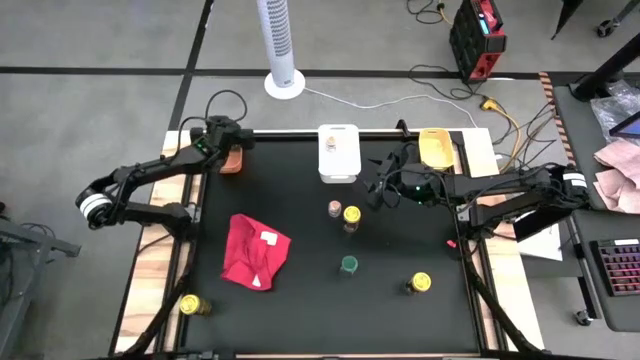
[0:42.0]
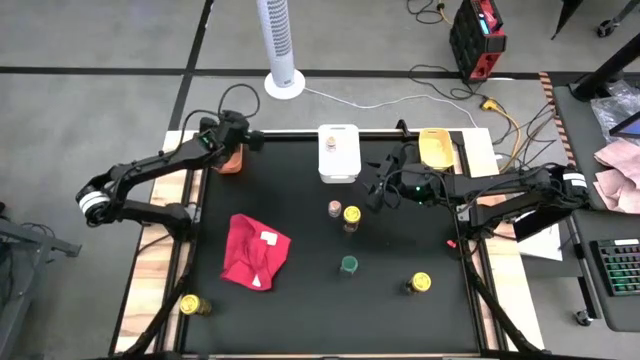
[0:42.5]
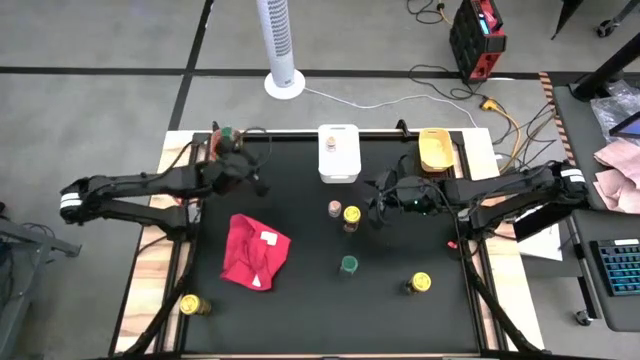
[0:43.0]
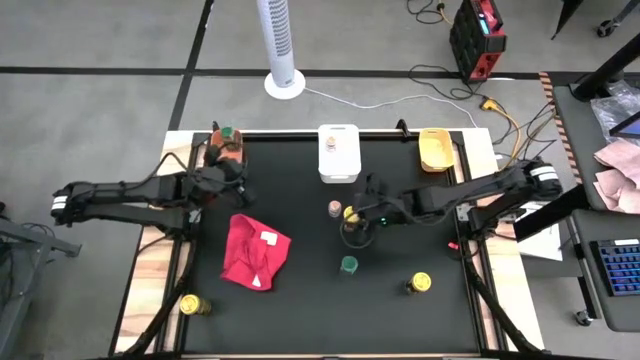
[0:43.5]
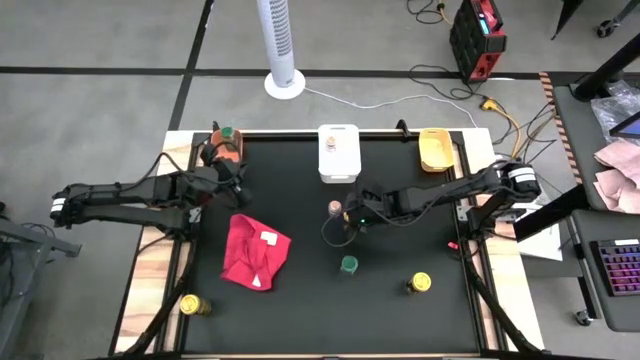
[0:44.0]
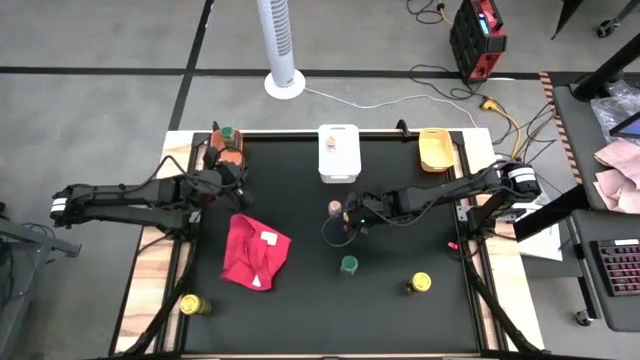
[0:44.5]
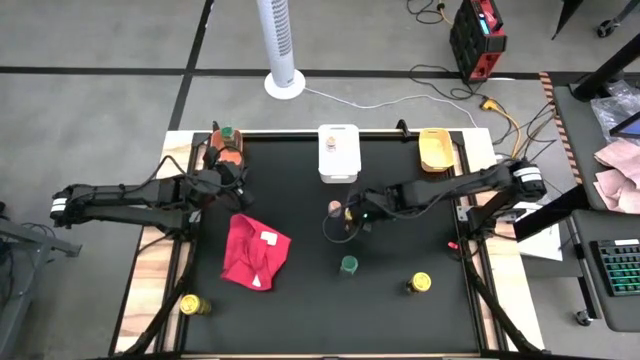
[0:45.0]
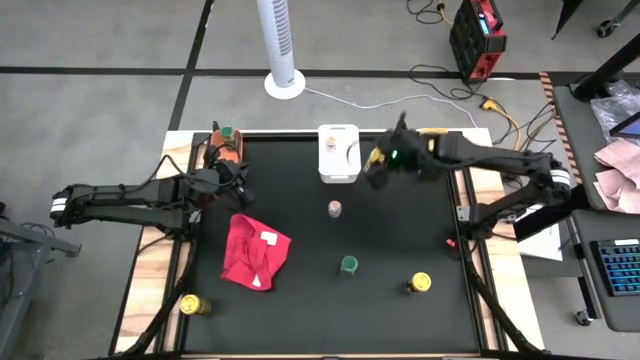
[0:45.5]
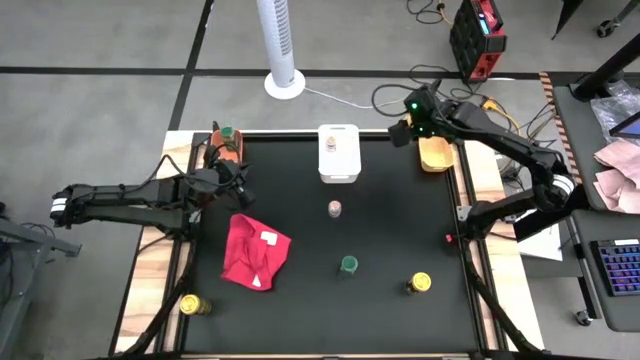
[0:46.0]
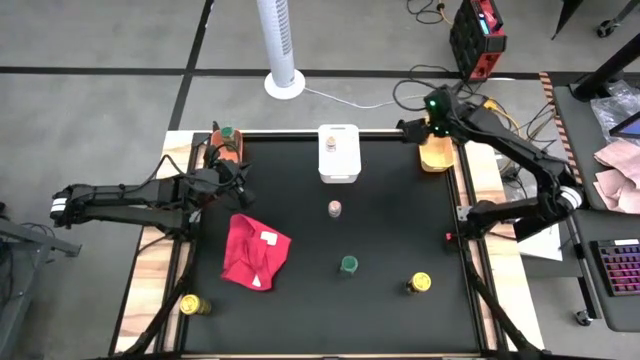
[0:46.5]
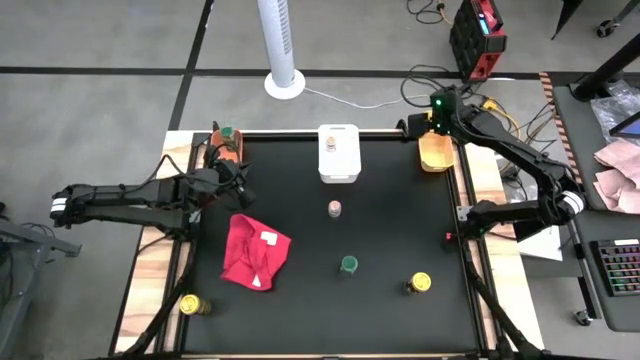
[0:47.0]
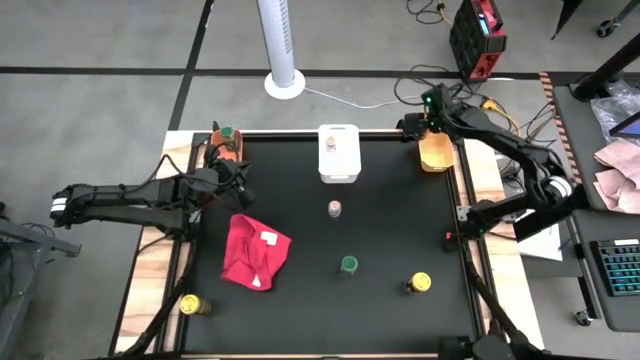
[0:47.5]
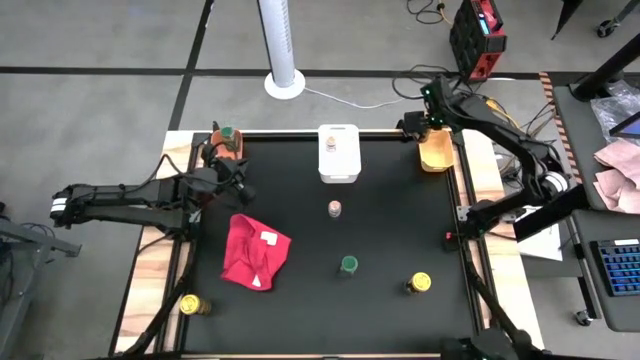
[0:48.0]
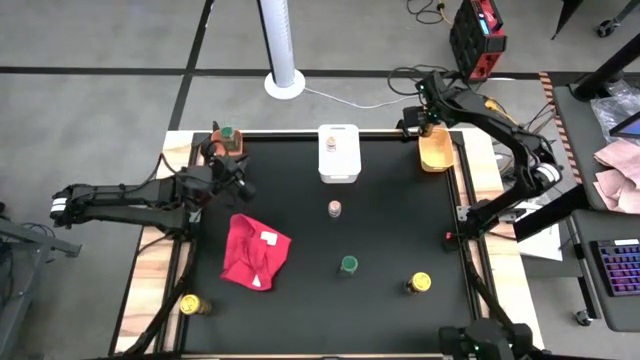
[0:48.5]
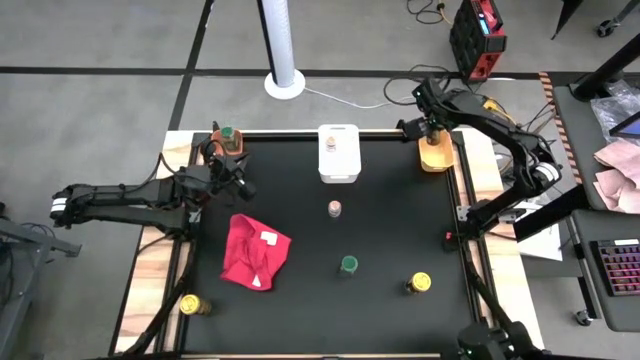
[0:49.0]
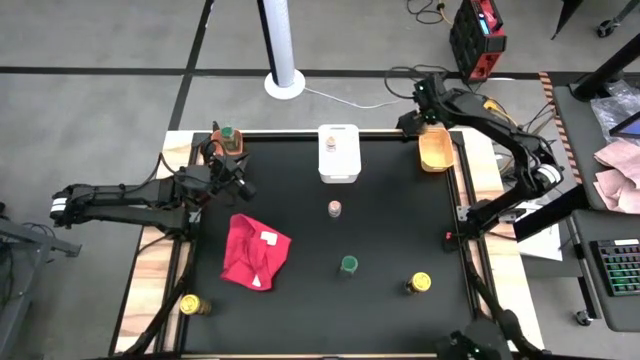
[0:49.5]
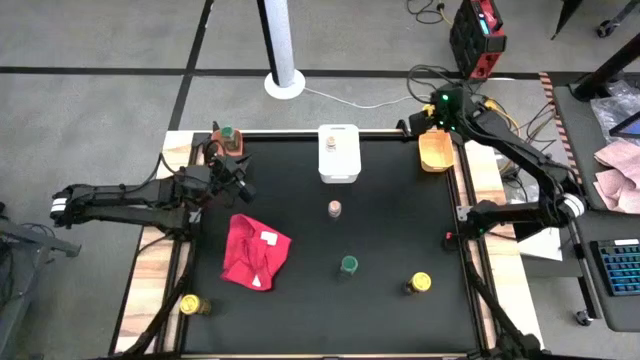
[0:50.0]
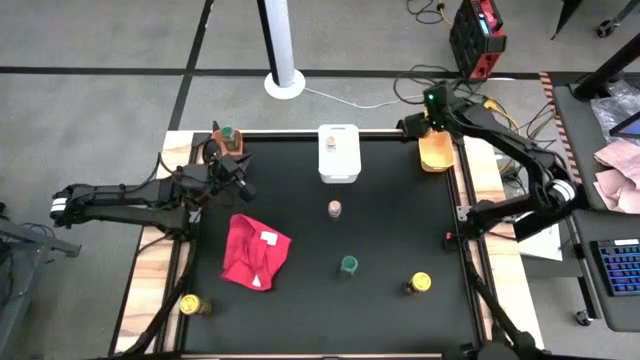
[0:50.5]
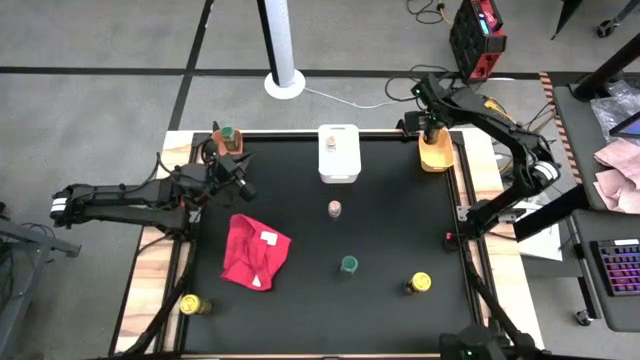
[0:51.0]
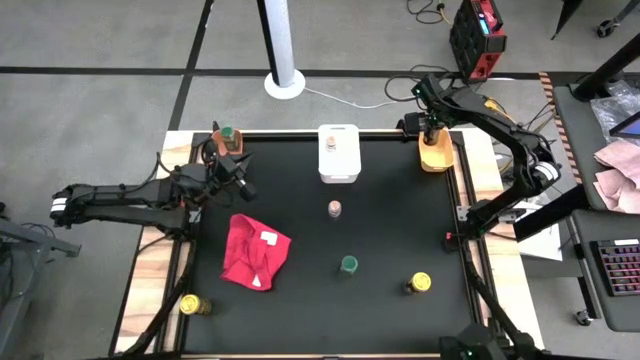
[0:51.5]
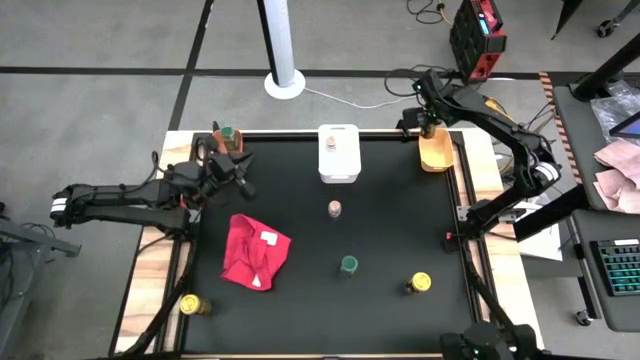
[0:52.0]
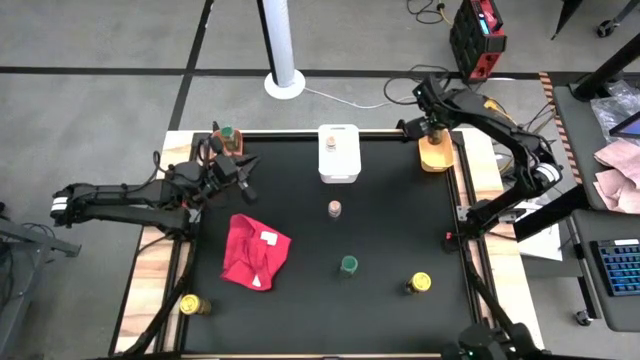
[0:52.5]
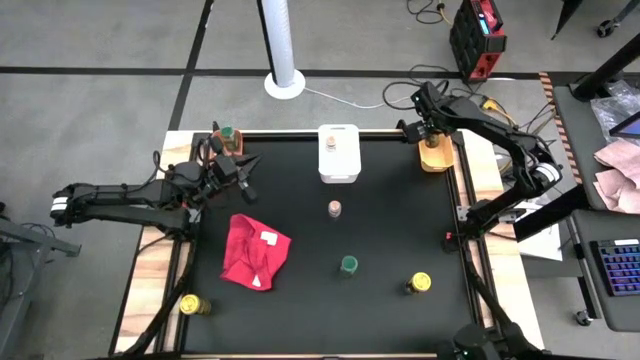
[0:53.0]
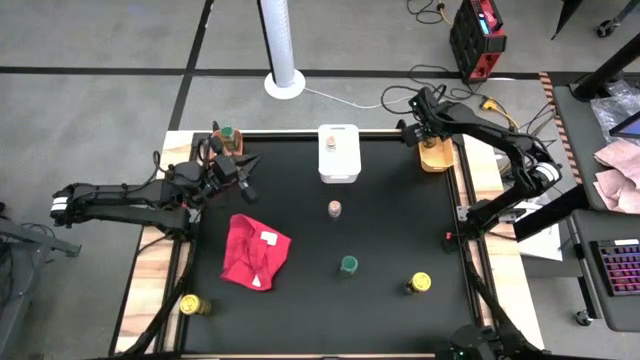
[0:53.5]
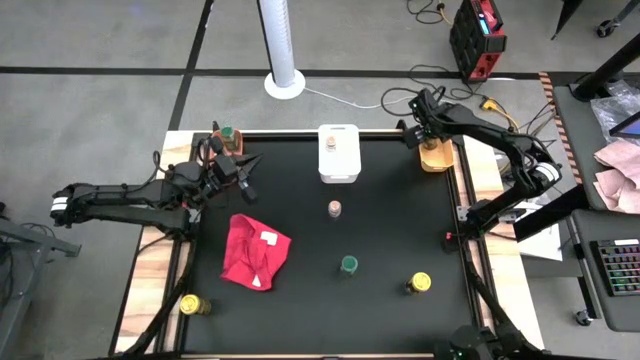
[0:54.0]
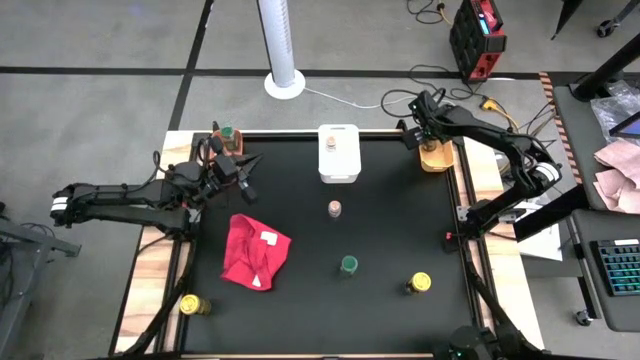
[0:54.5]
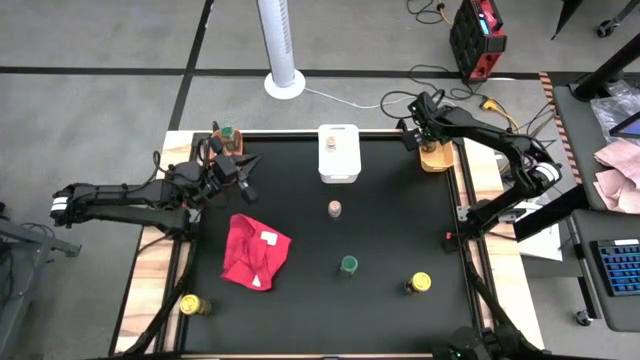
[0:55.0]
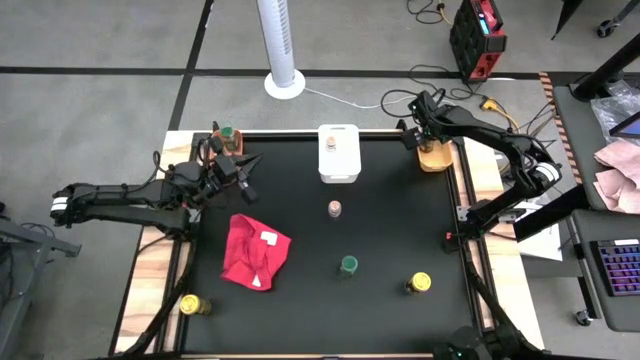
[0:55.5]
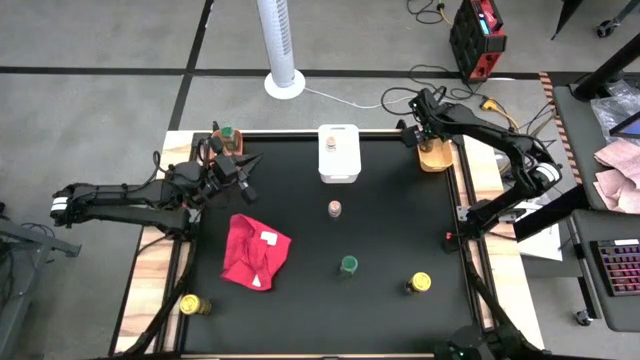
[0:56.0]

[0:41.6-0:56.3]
Task: Sort spices by type
Put the top yellow seasoning bottle into the yellow bin

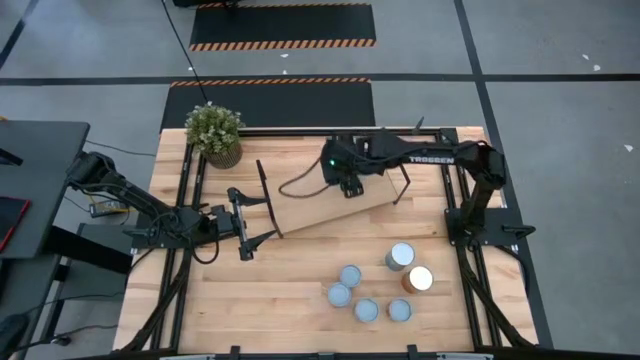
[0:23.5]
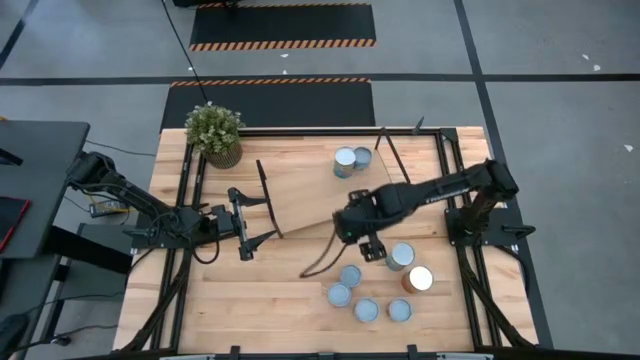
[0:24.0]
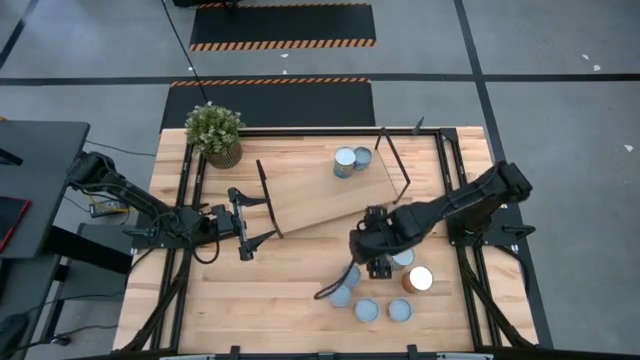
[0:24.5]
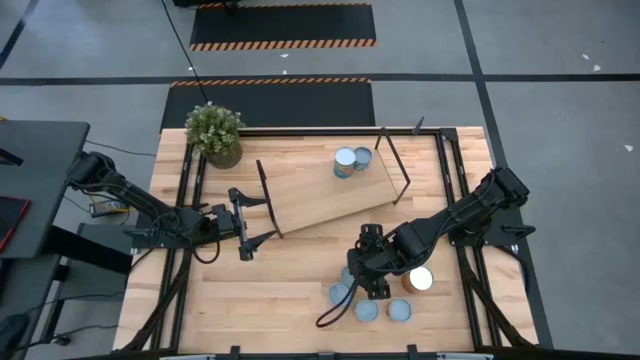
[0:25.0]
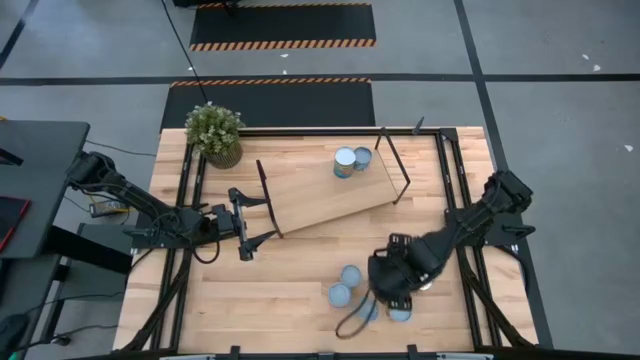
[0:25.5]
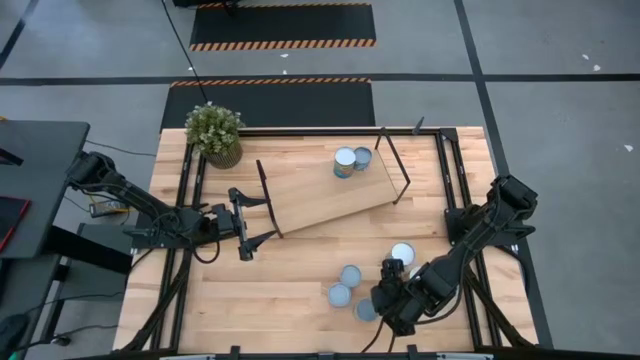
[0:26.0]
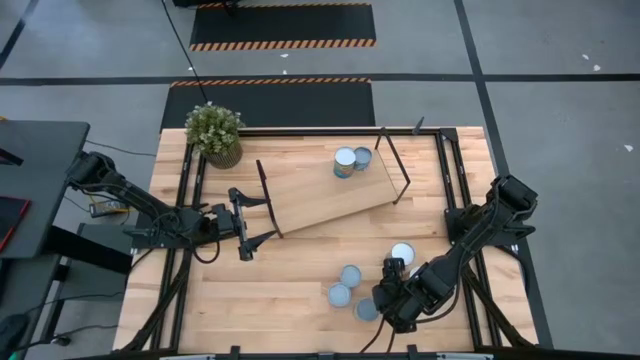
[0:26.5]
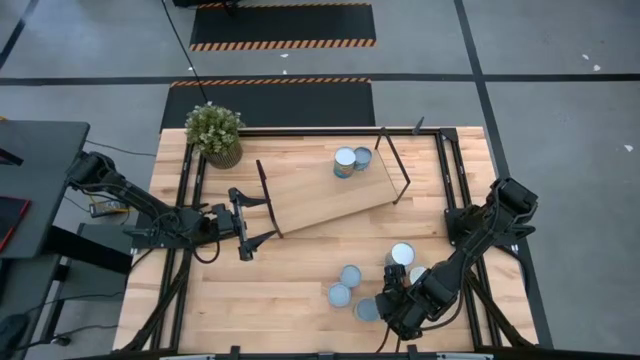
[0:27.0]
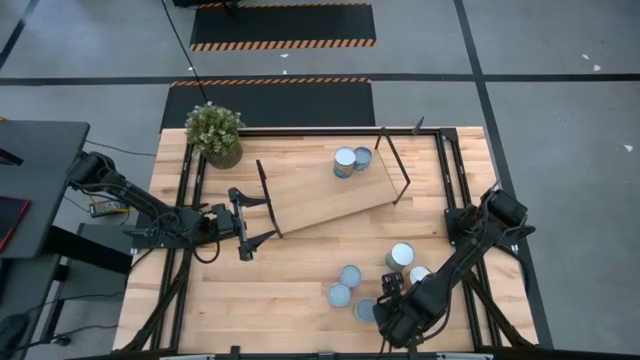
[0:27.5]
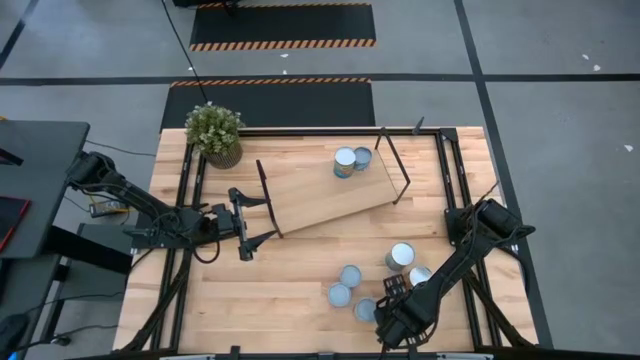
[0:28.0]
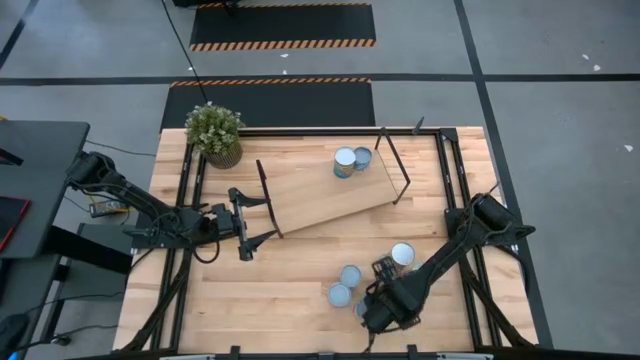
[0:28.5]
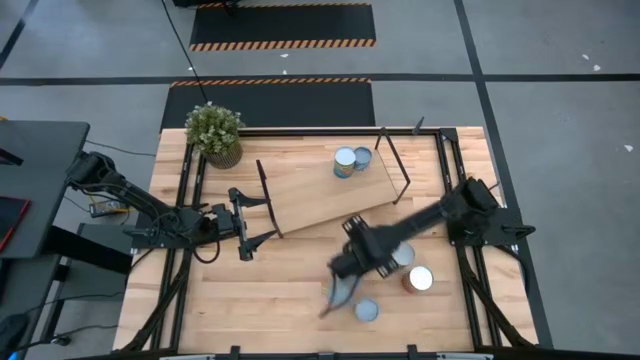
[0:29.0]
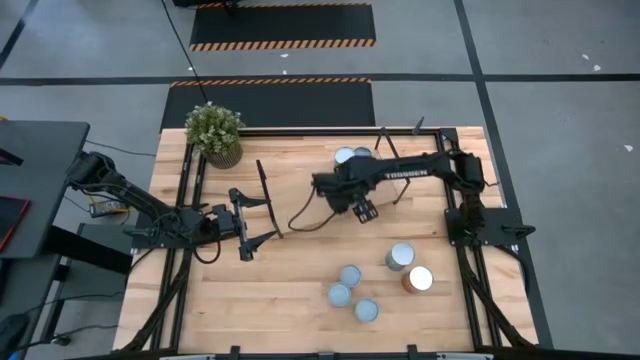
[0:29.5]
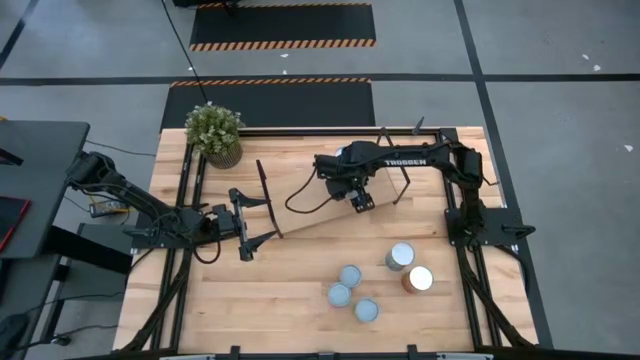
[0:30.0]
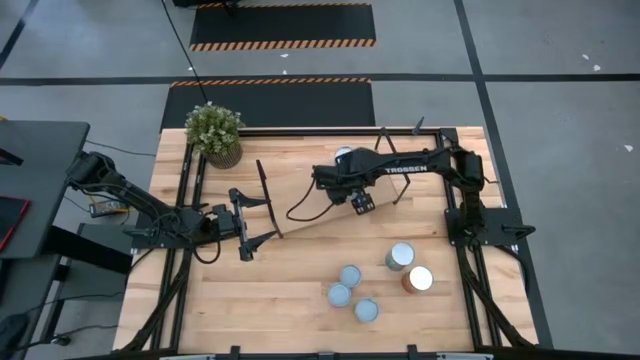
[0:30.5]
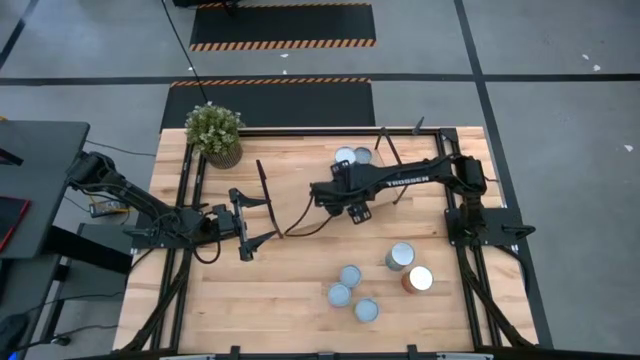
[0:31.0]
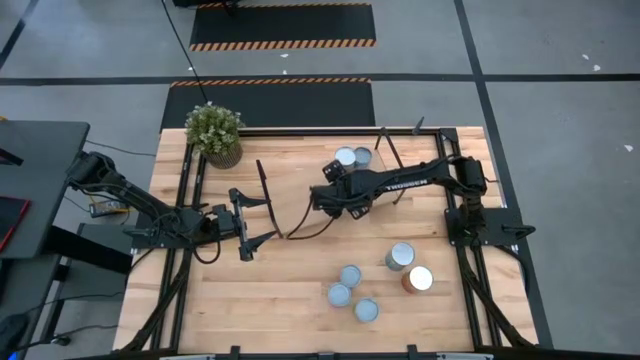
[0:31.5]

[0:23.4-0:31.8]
Task: Pick and place cans onto a shelf
Put the red can on the shelf aligned with the other blue can
